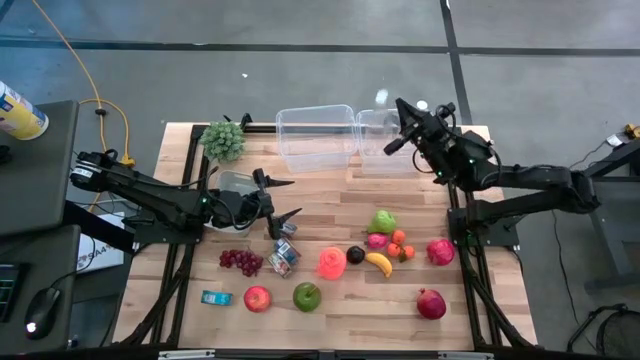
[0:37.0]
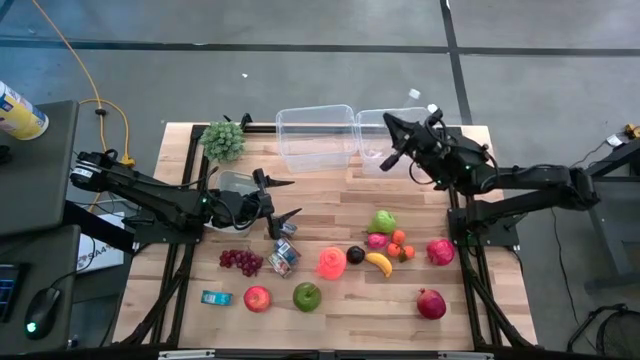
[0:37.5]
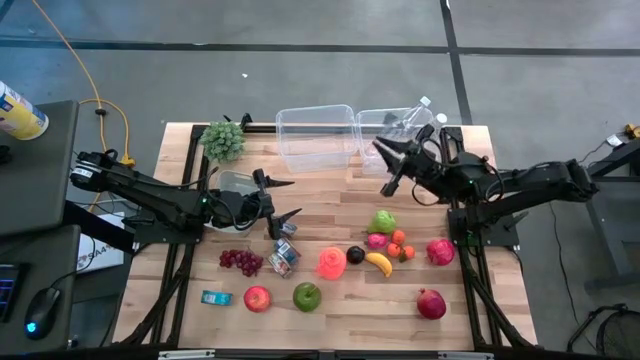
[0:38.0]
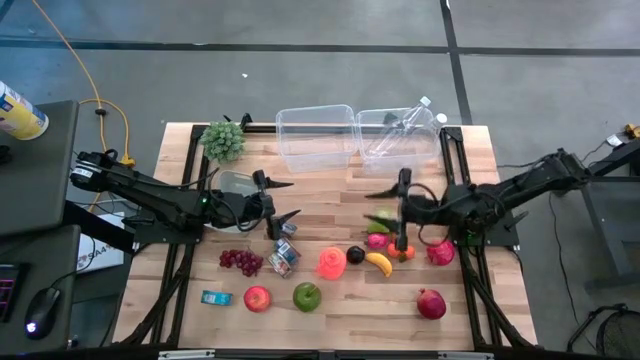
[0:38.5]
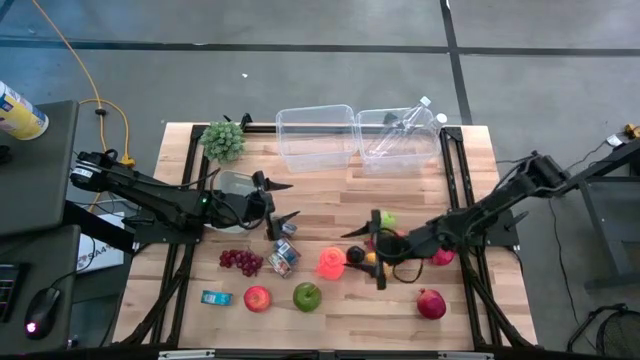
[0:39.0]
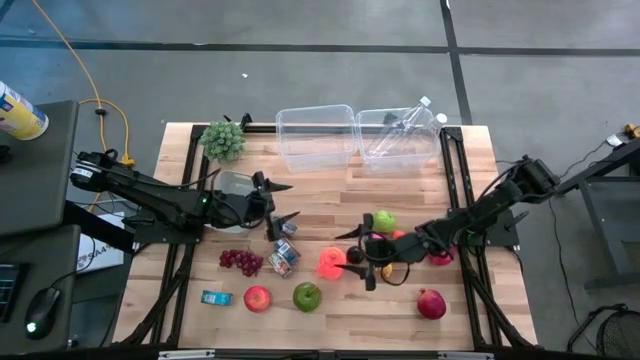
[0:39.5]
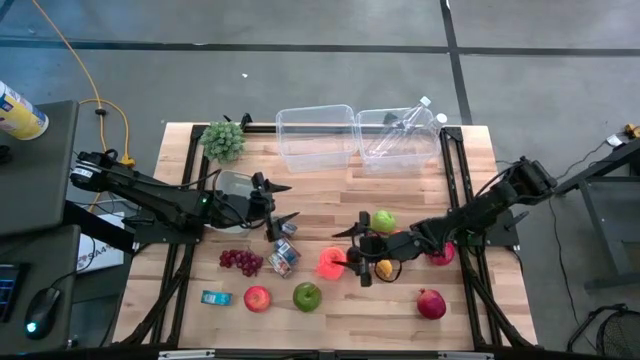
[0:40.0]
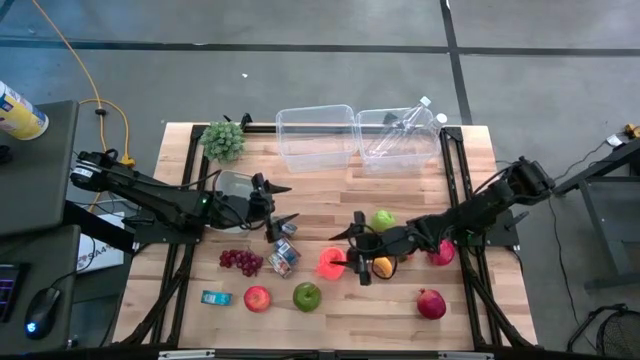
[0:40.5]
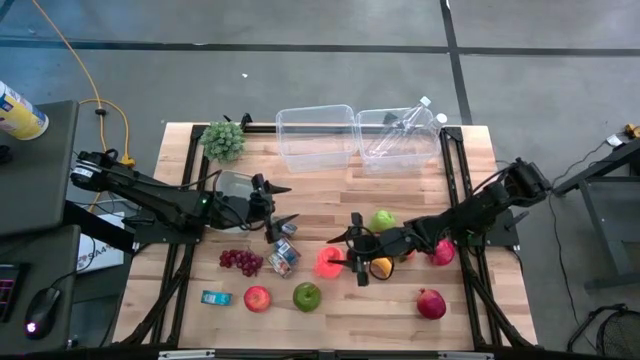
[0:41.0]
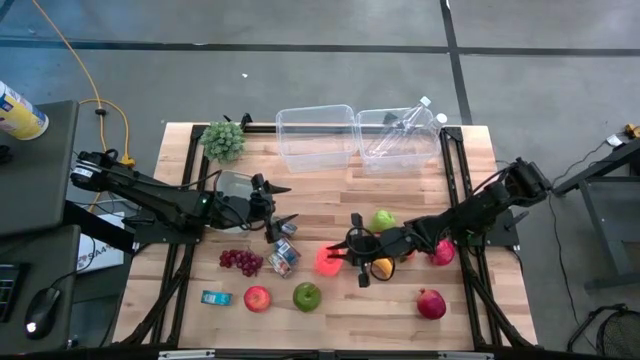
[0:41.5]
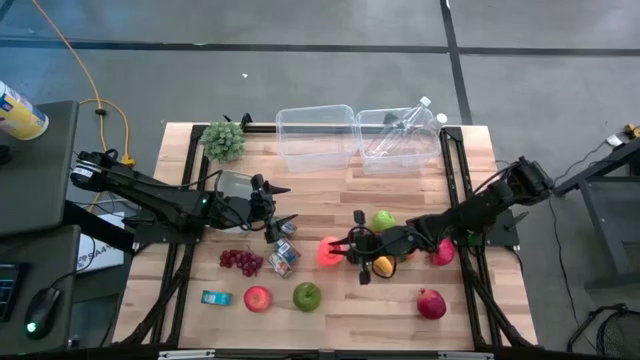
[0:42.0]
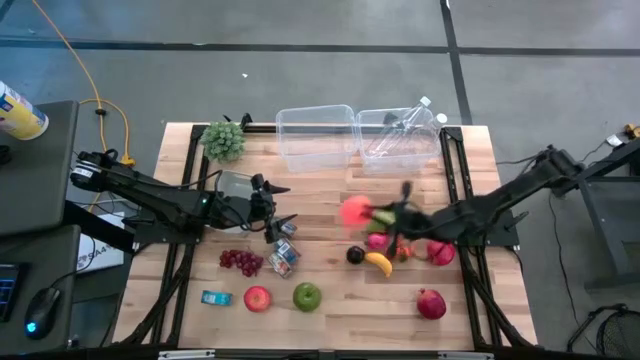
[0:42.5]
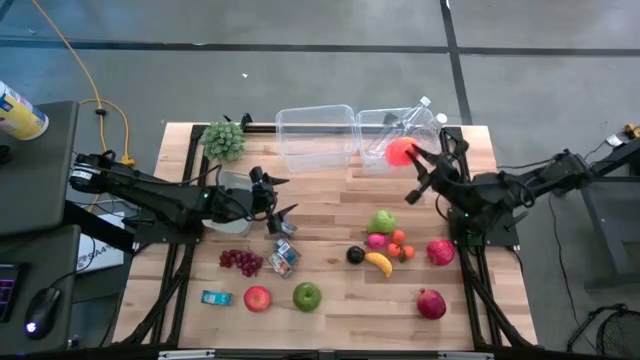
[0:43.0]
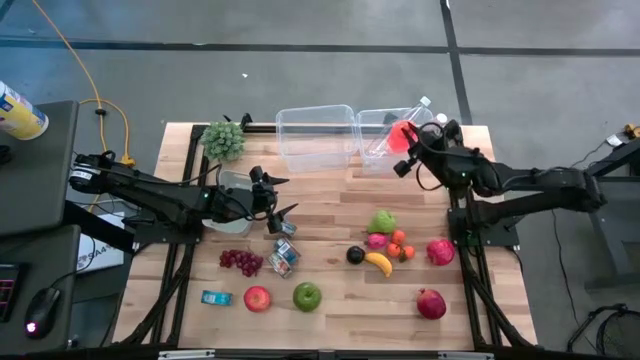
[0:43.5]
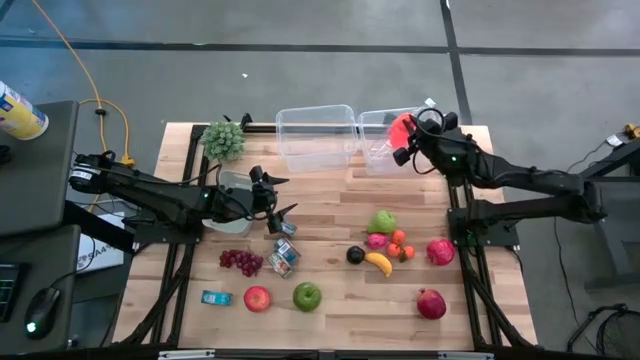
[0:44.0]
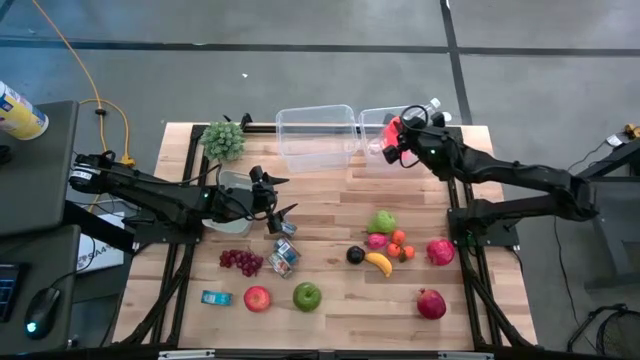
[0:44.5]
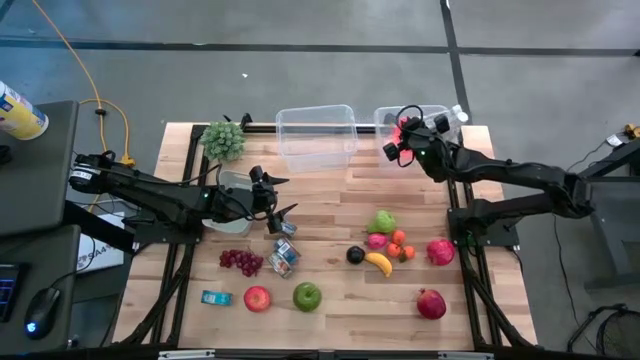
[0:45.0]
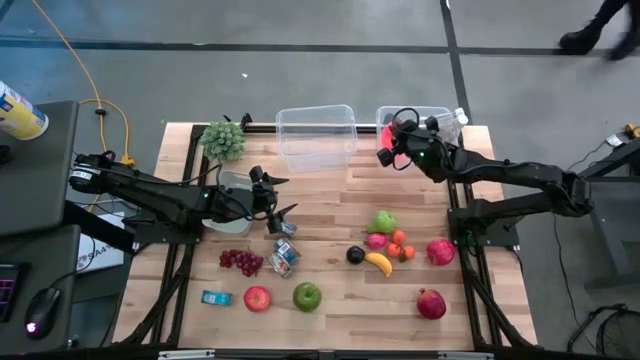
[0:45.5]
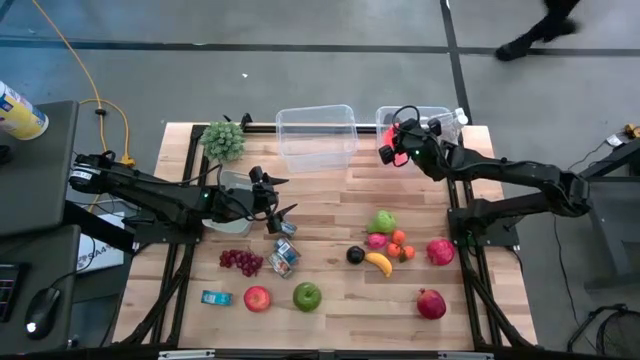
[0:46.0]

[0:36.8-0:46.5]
Task: Pick & Place Food Item
Put the orange bottle water into the right transparent bin

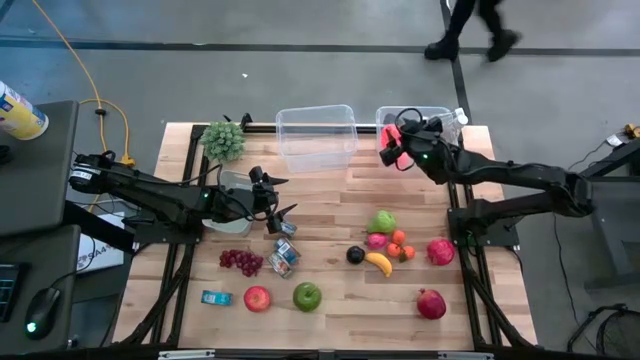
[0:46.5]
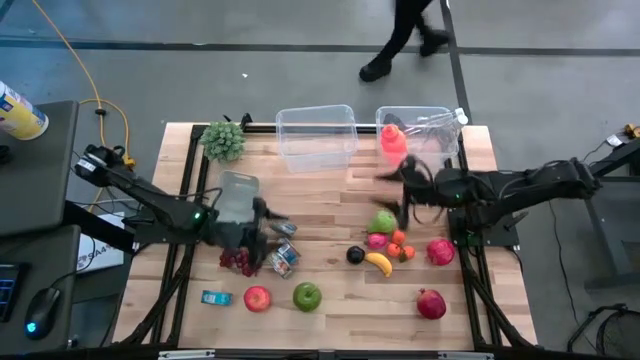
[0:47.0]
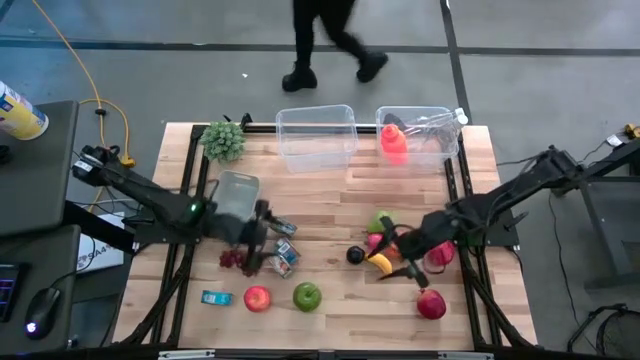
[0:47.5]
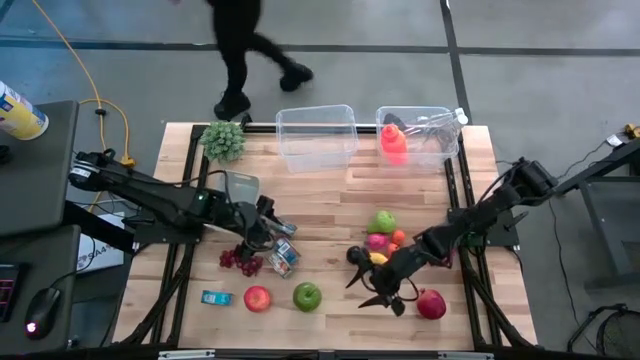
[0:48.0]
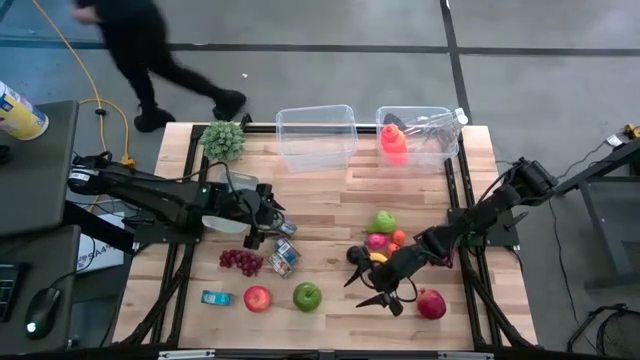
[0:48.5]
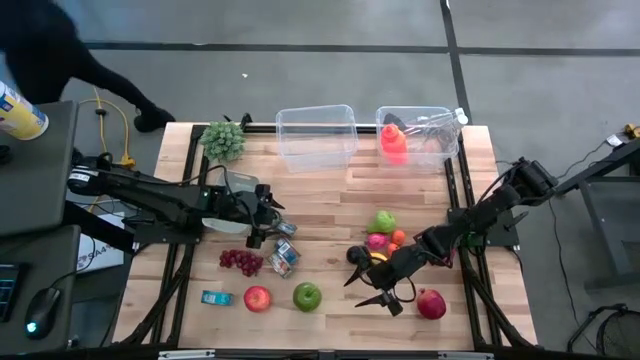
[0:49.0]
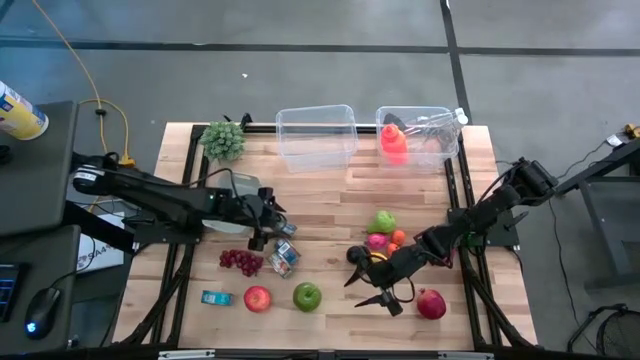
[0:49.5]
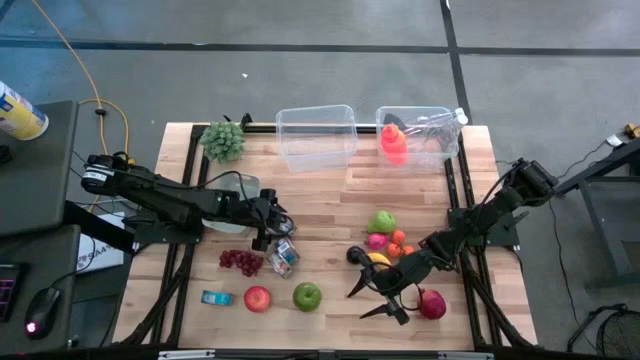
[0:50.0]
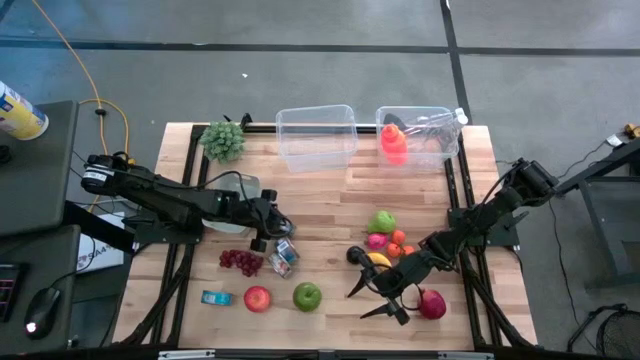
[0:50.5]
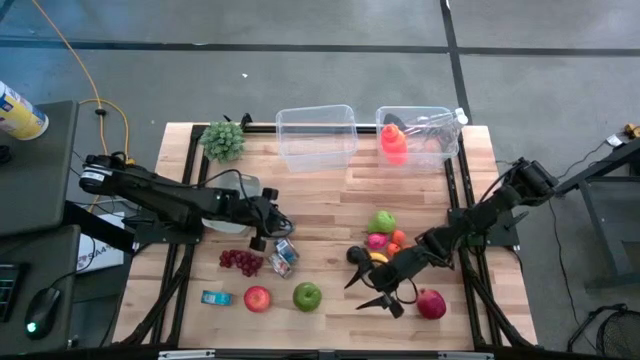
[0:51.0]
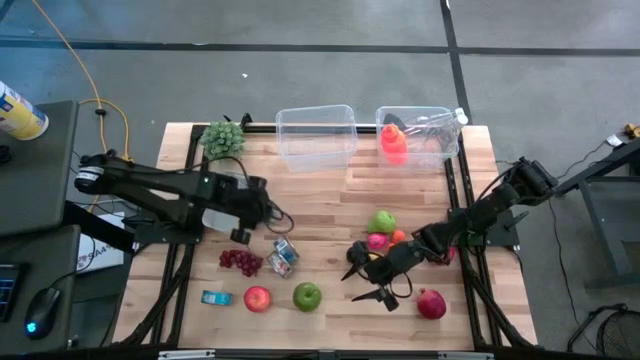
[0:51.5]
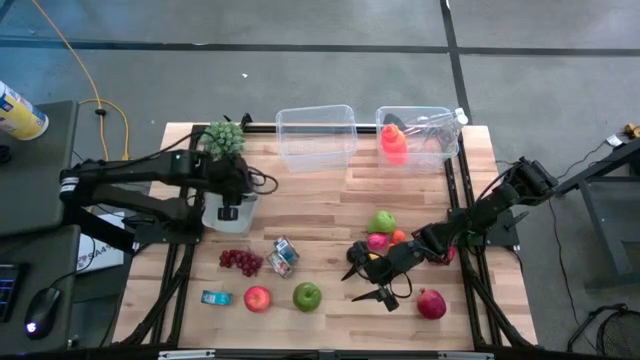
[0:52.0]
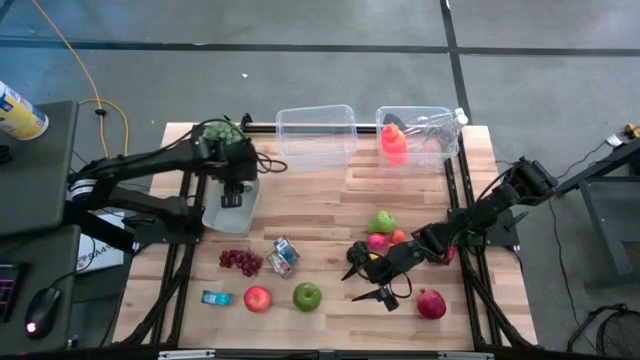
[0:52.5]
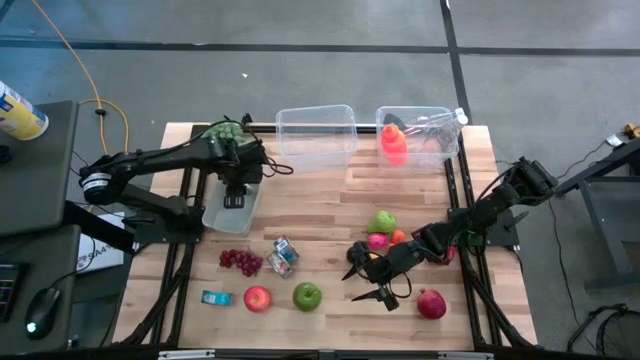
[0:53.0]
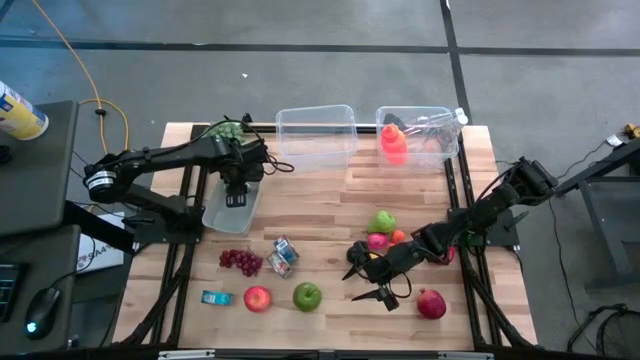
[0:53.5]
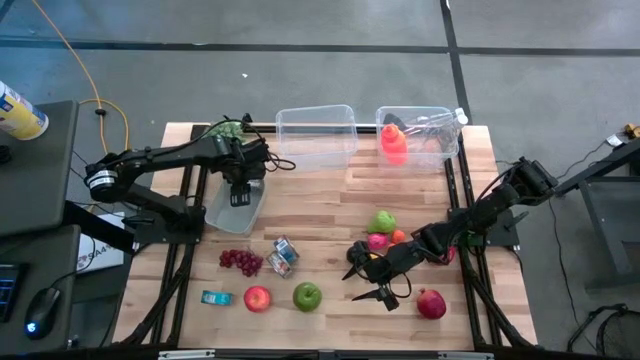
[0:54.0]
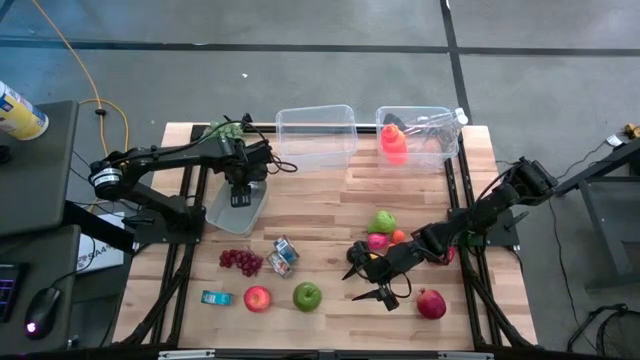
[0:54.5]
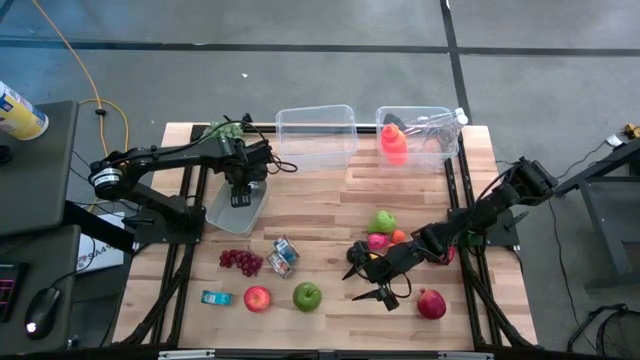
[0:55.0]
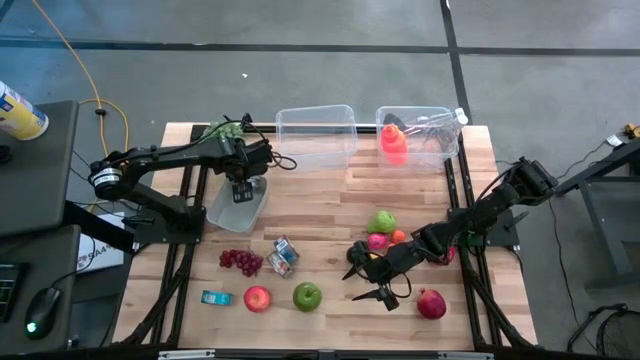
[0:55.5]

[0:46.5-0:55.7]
Put the green tuna can into the grey bin

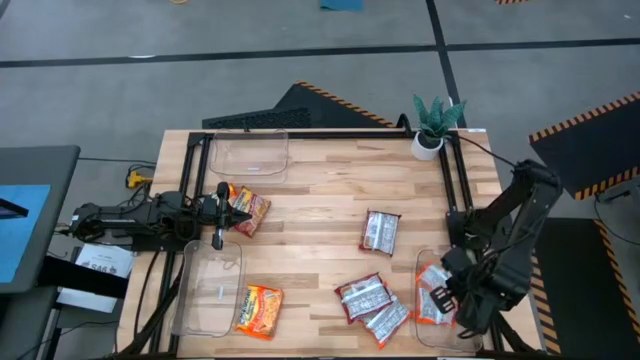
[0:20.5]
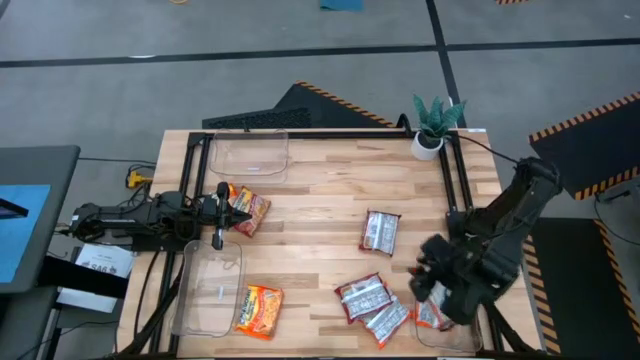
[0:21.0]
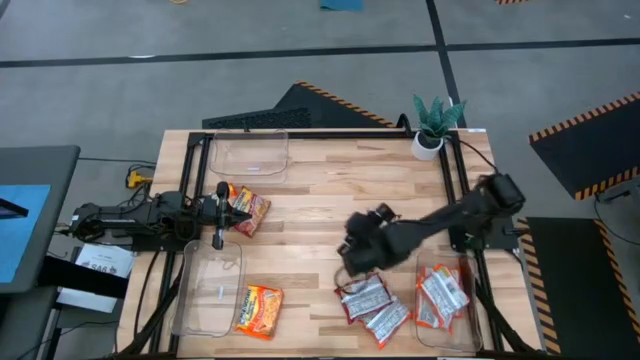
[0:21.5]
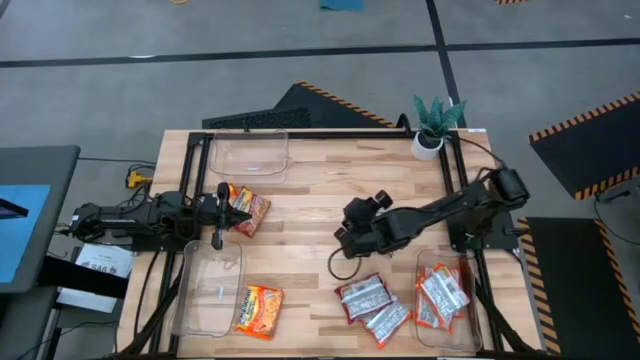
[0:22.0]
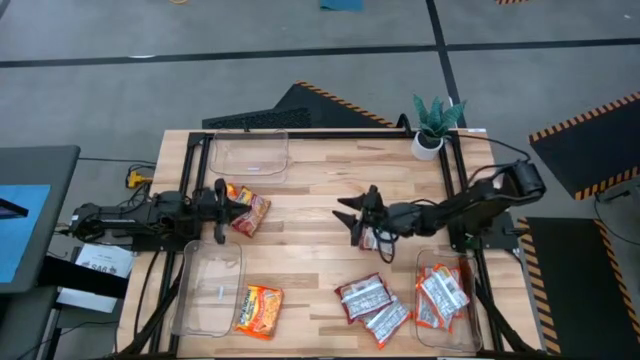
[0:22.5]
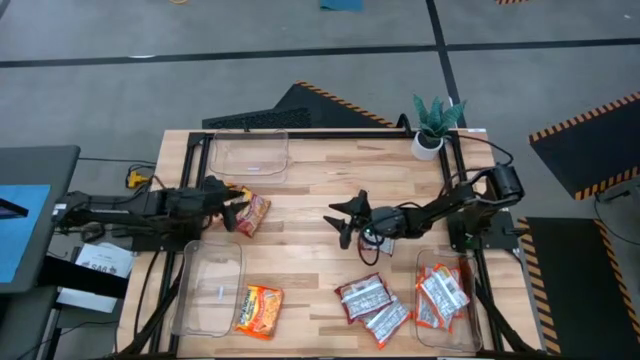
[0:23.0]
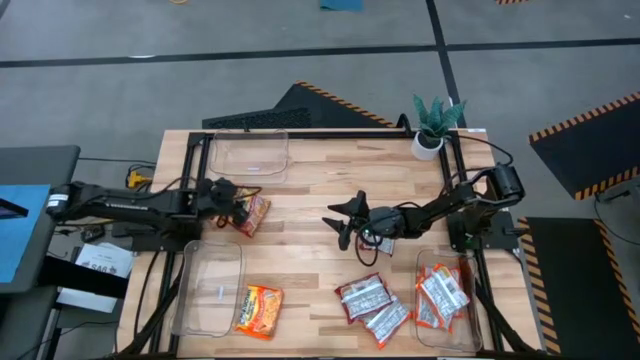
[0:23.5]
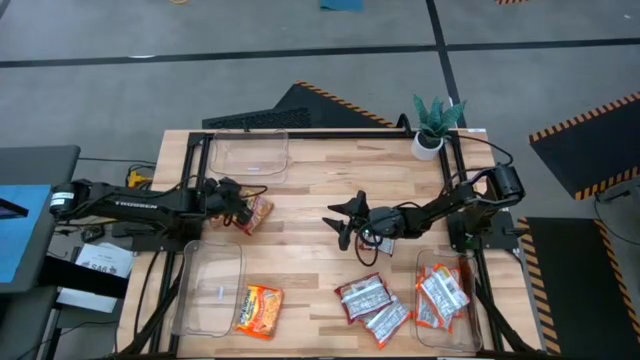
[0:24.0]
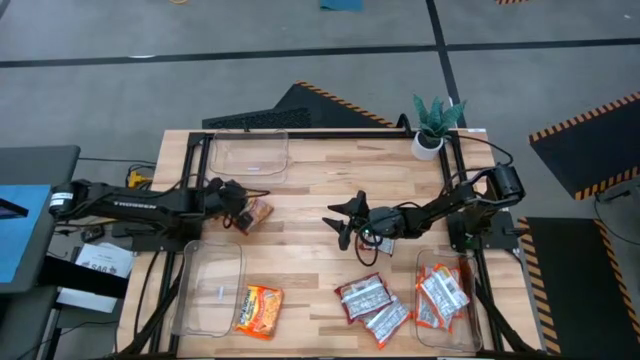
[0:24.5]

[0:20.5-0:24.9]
Task: Sort Maruchan noodles
Put the red noodle pack into the top left transparent bin
